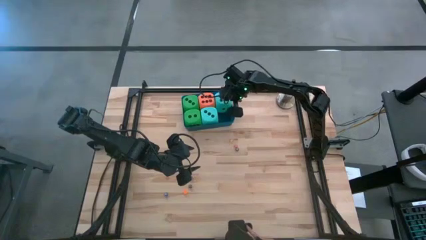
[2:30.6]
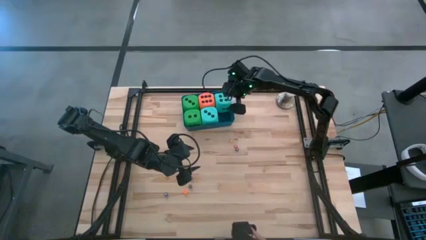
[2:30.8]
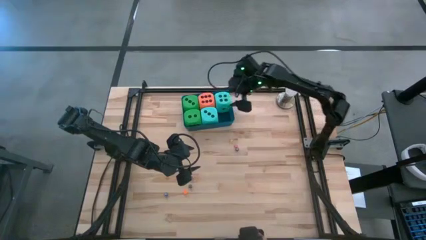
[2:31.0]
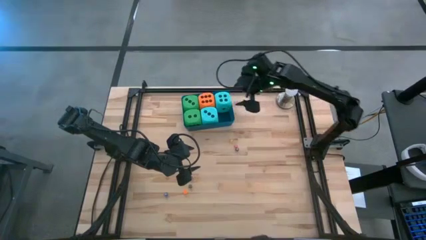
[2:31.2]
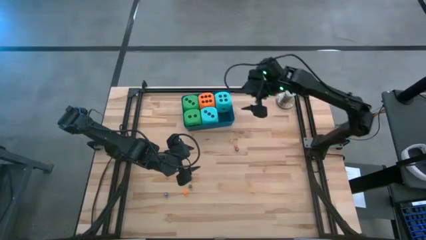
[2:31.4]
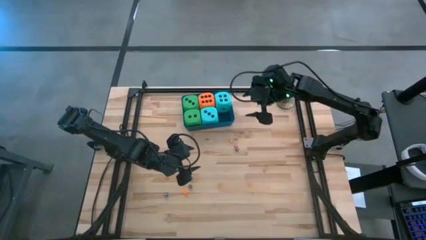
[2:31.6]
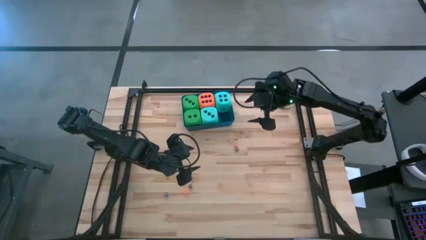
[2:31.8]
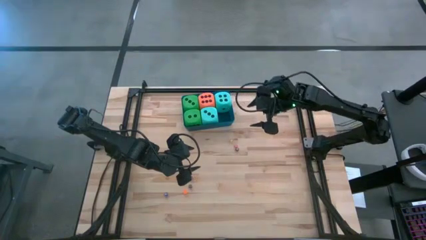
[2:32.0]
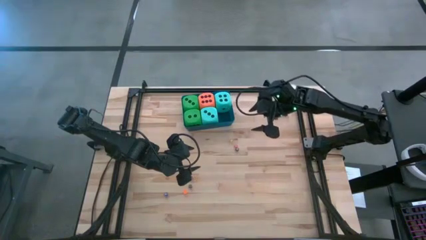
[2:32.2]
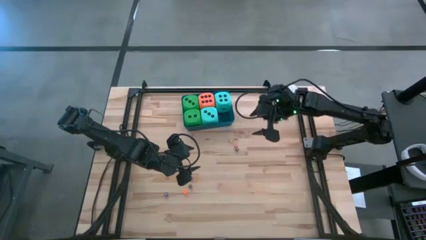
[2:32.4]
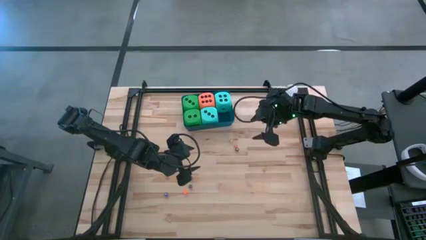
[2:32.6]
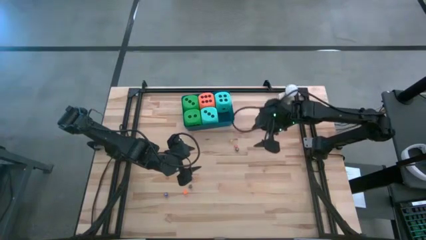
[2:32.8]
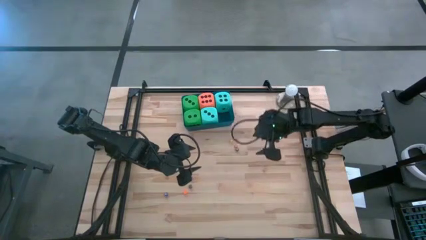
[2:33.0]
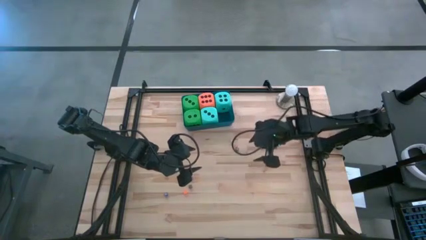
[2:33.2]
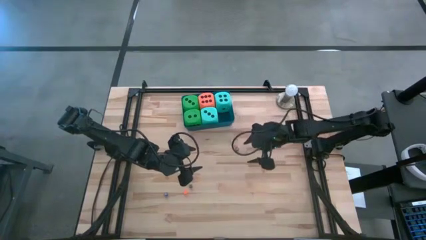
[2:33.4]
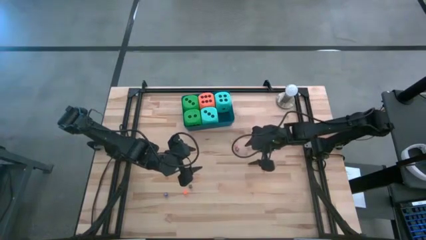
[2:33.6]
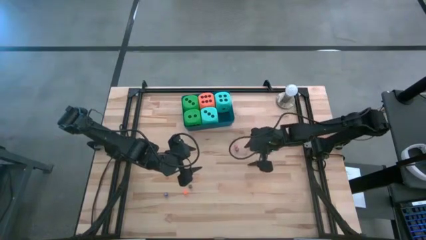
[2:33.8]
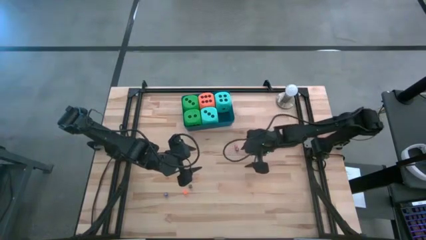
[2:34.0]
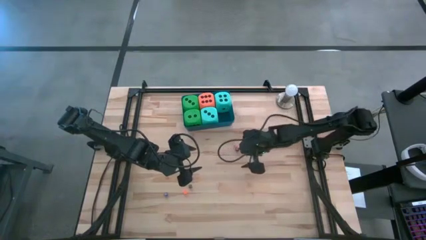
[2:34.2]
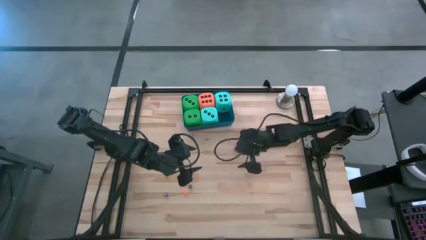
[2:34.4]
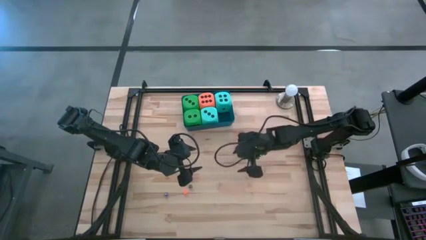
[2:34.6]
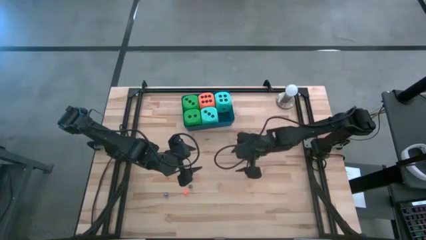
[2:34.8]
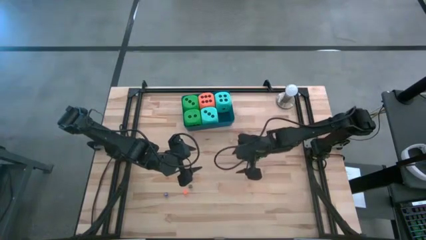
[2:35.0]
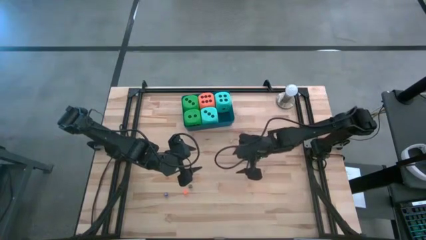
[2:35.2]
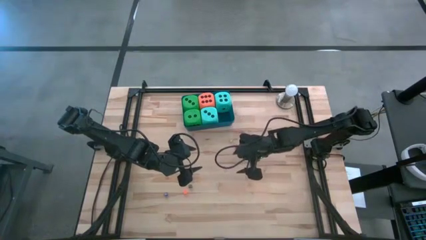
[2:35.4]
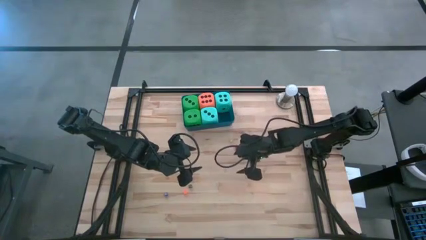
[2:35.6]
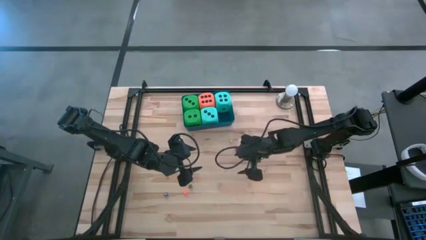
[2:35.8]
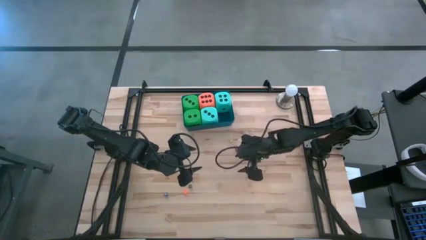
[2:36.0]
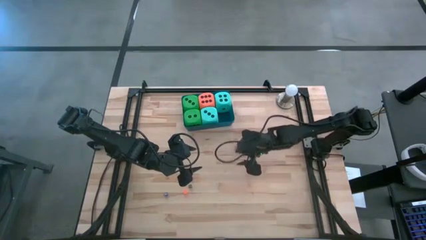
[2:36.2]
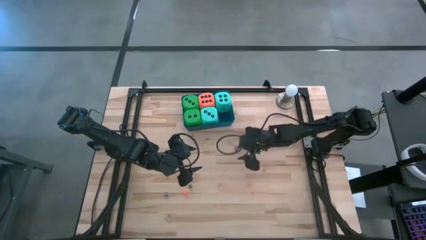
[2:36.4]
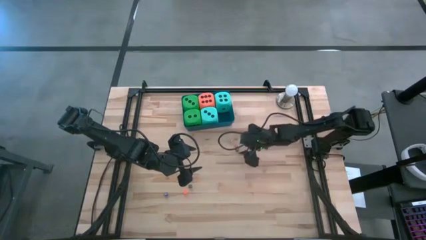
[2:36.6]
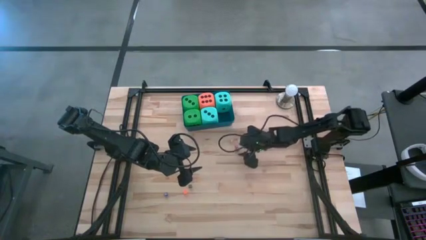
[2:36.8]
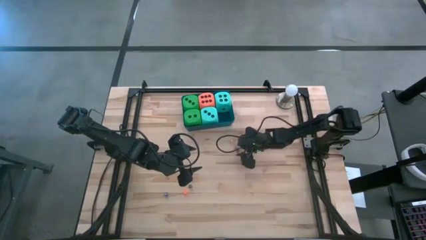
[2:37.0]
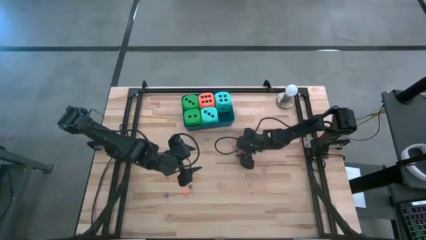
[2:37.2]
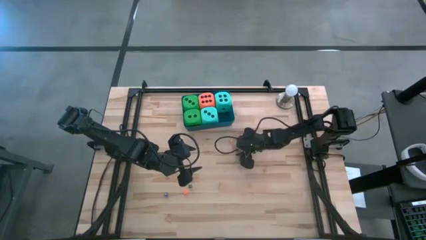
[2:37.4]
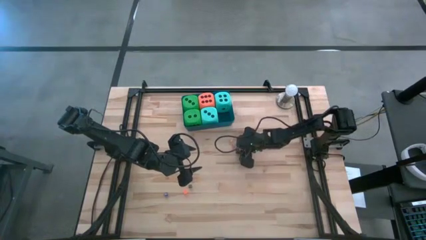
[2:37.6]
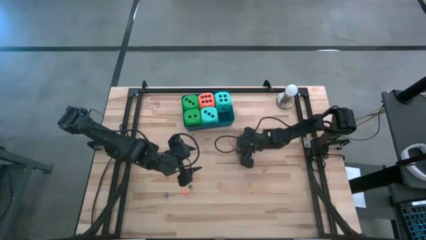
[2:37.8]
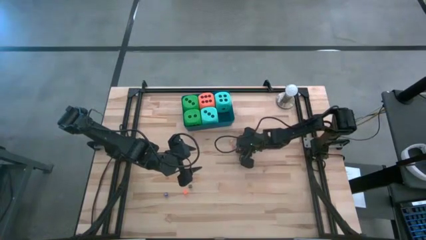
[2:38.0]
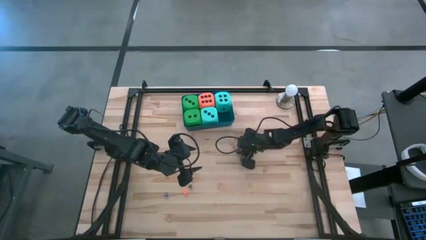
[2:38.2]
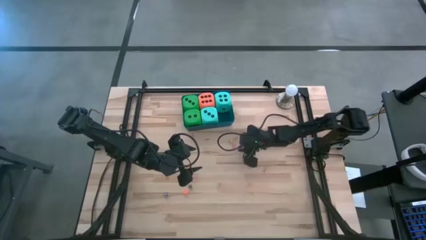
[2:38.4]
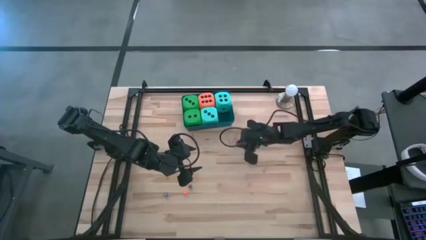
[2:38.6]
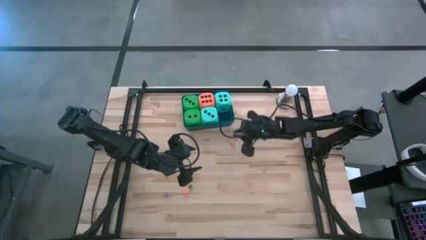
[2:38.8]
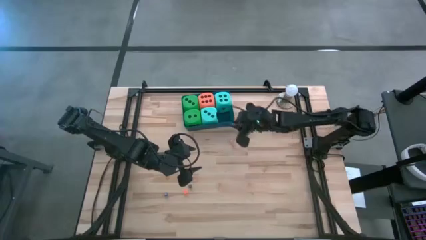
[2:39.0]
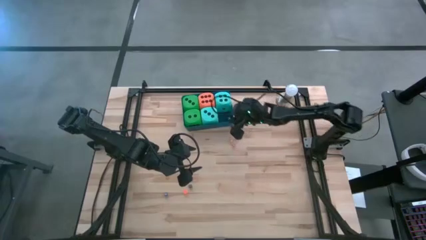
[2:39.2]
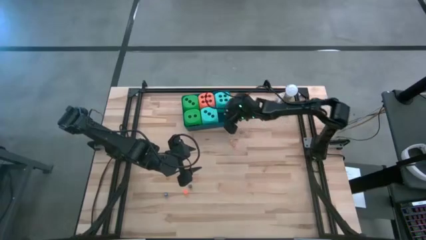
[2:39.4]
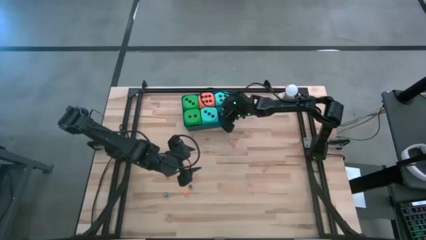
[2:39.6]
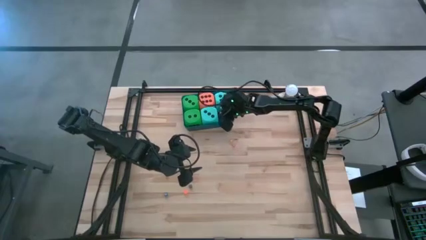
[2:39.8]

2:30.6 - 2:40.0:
Task: Pick & Place Dice
Put the top small black dice into the blue bin

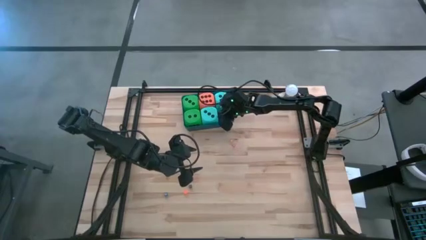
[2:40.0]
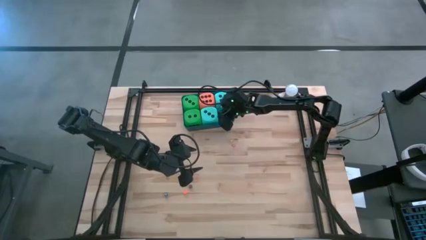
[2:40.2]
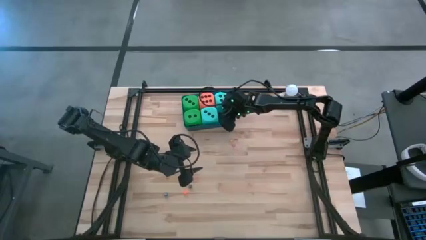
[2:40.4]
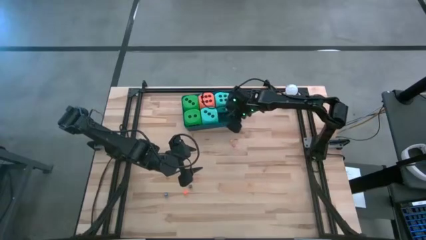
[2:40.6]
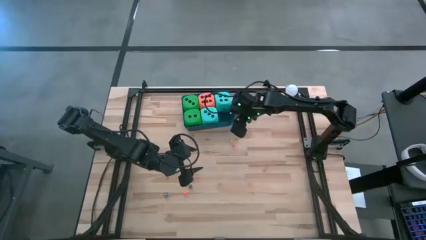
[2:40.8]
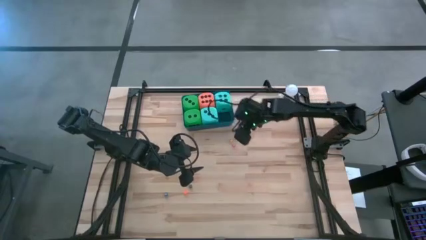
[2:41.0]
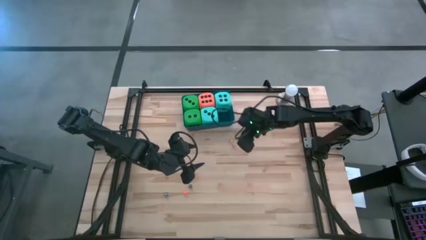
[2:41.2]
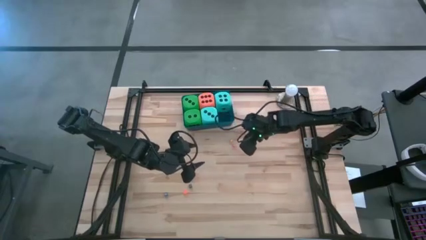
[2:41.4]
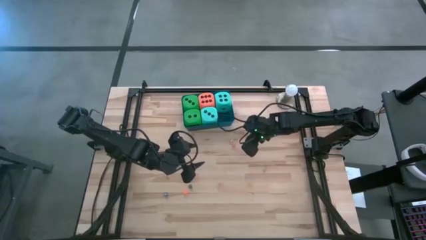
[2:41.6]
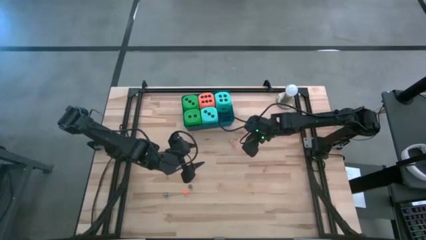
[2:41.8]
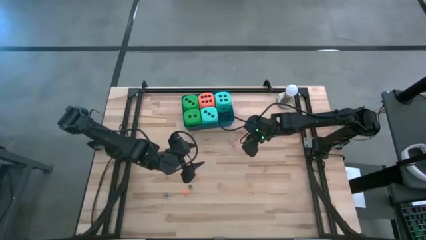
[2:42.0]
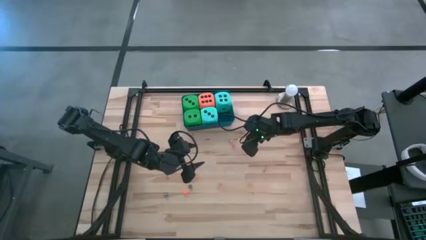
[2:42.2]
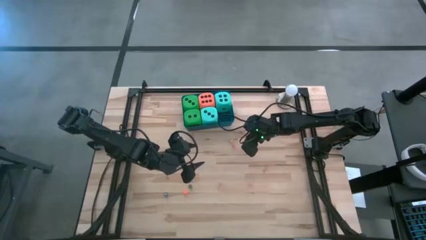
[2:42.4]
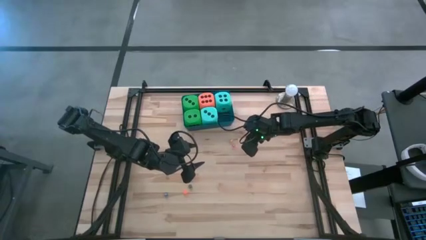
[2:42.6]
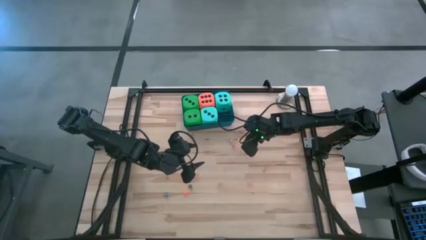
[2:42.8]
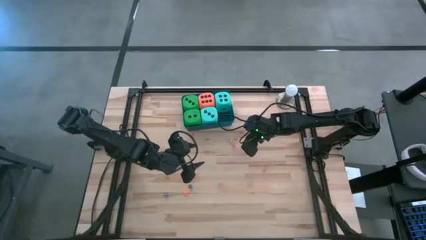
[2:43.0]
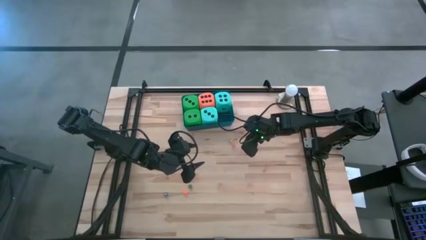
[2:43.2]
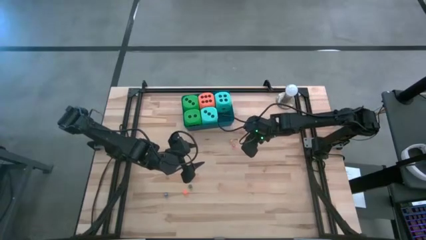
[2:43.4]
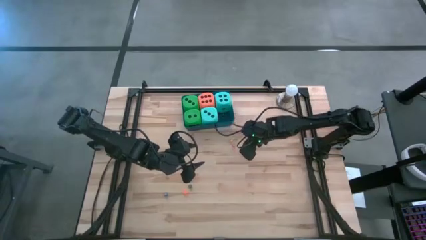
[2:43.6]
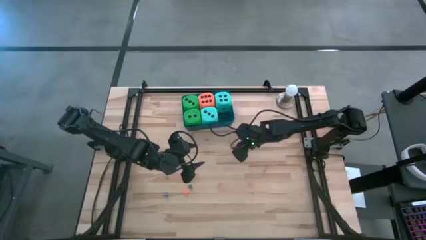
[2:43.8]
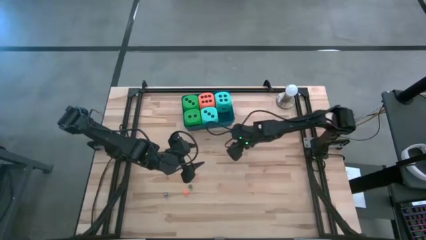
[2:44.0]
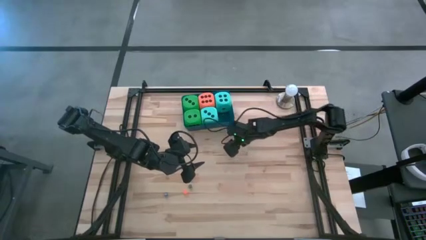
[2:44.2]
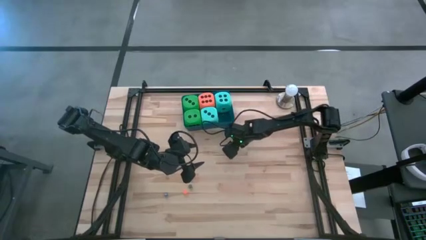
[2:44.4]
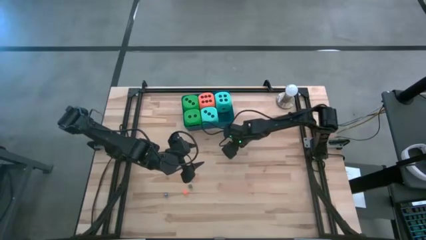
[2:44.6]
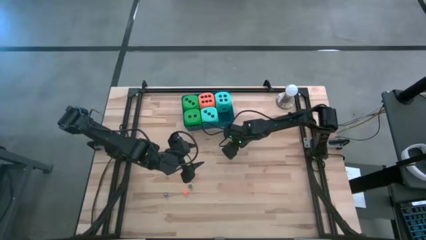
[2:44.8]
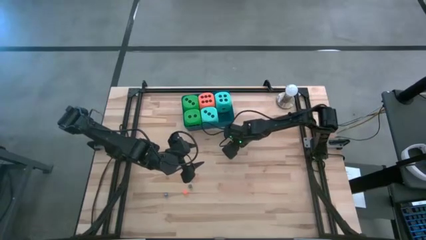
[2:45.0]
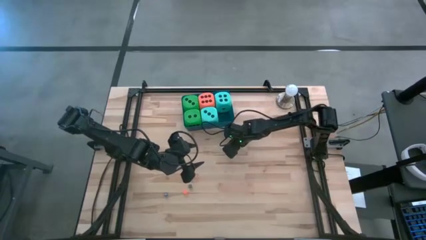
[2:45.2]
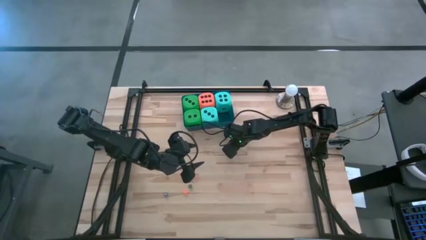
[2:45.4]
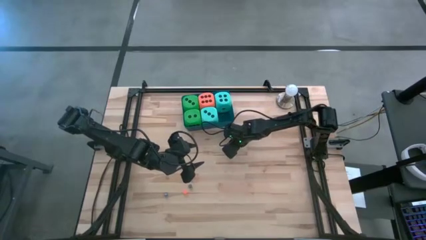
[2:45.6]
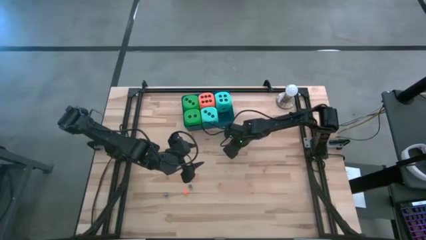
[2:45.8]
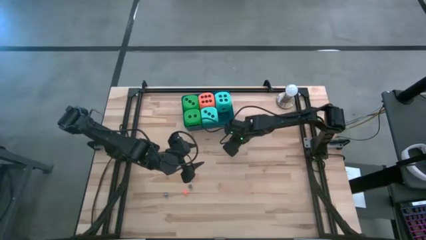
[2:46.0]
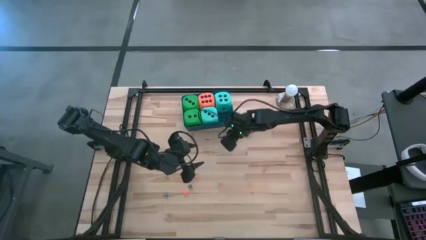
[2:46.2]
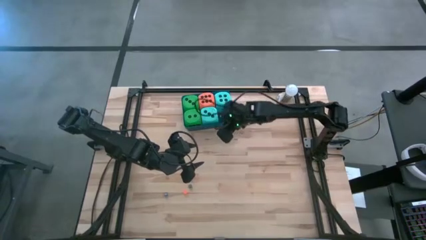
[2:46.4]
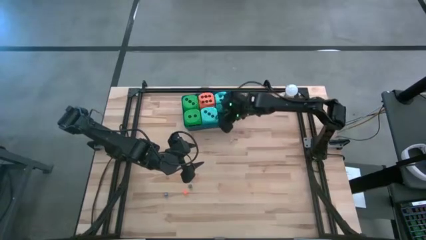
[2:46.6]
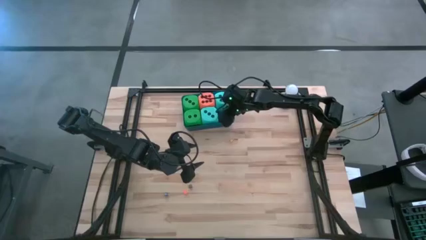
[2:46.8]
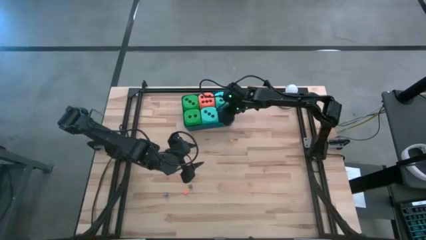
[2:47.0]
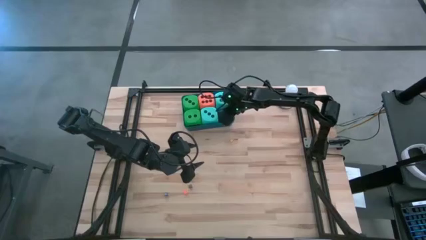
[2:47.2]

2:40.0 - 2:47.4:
Put the small red dice into the blue bin
